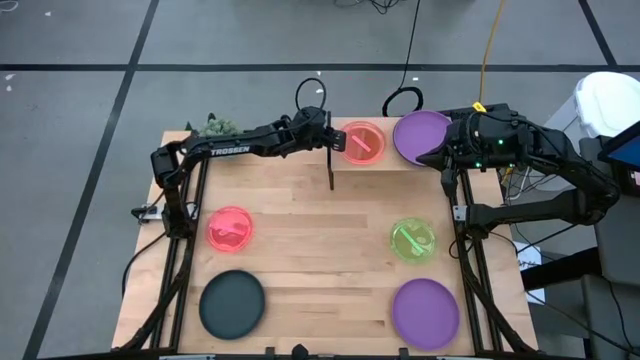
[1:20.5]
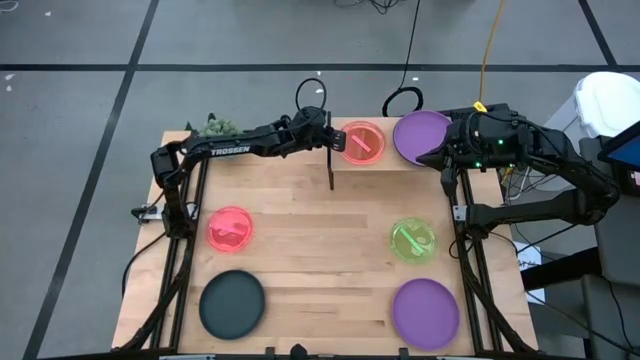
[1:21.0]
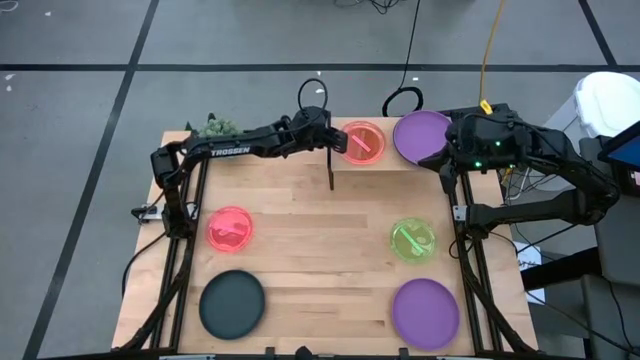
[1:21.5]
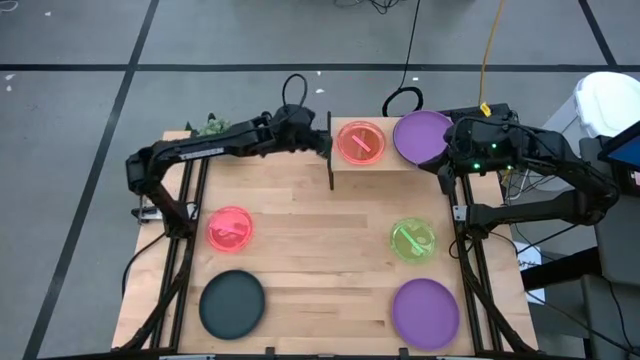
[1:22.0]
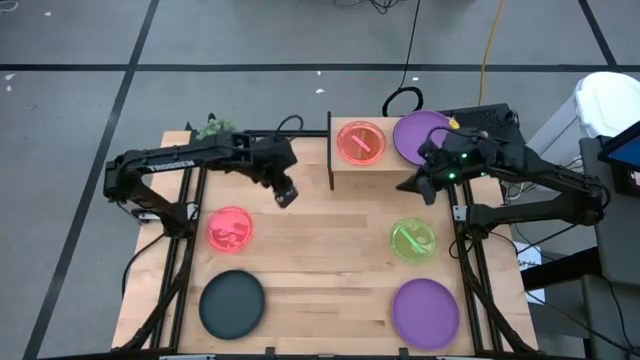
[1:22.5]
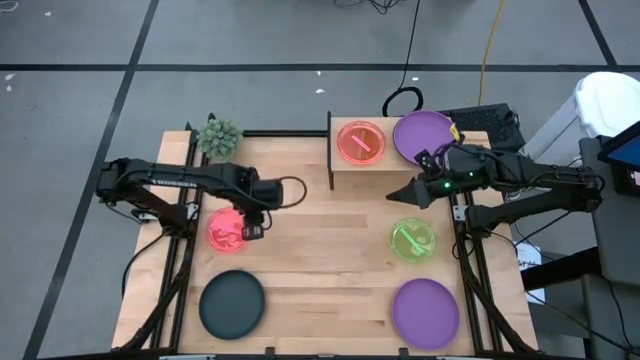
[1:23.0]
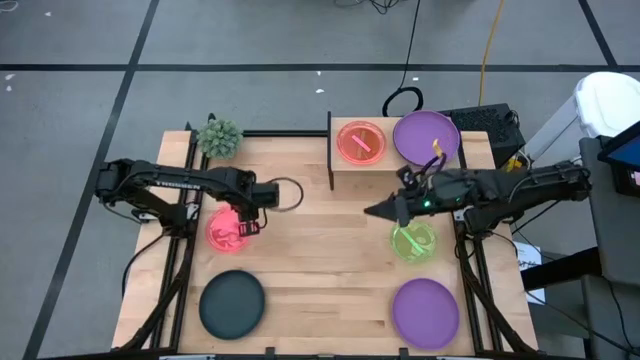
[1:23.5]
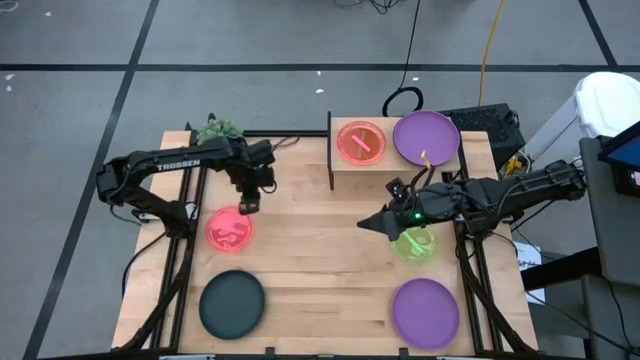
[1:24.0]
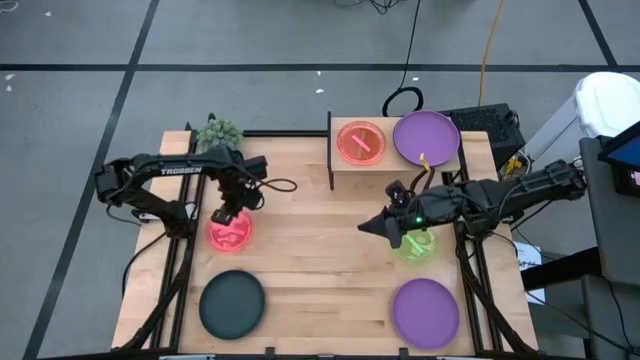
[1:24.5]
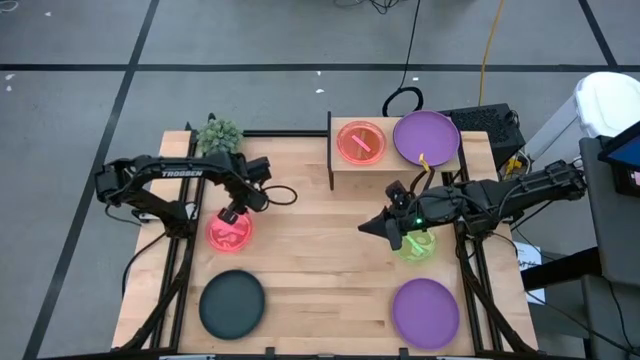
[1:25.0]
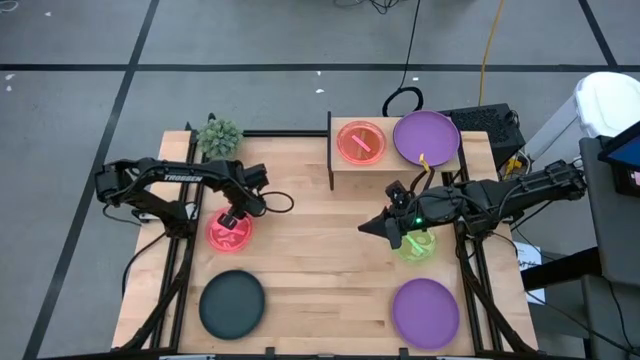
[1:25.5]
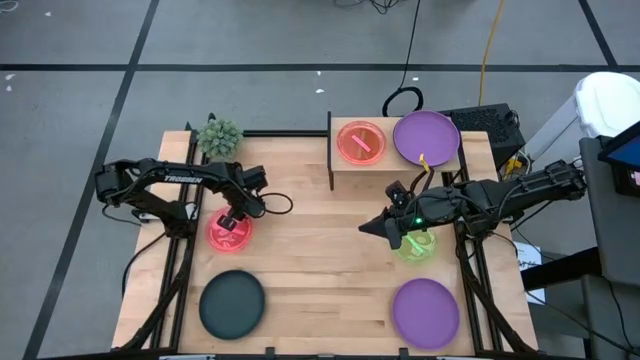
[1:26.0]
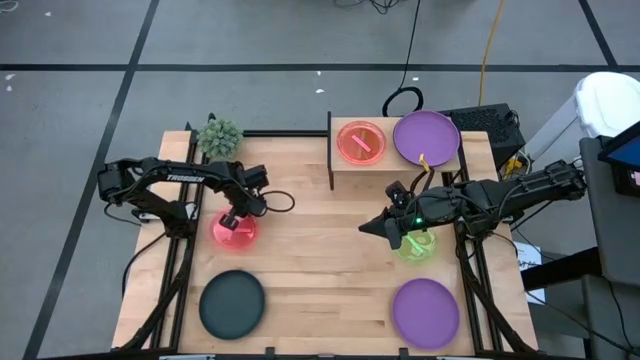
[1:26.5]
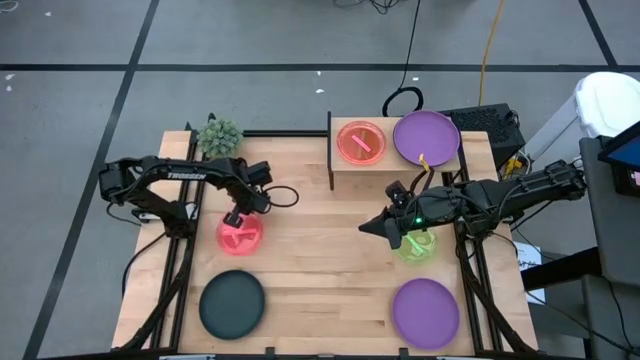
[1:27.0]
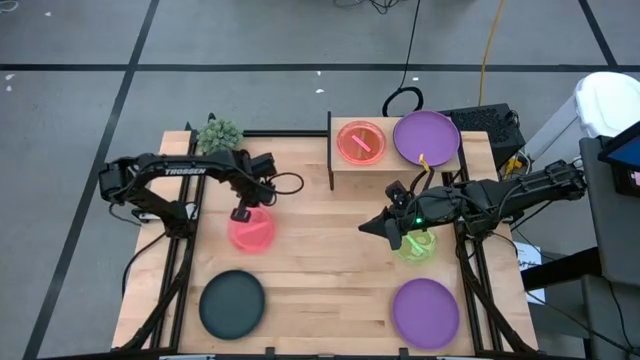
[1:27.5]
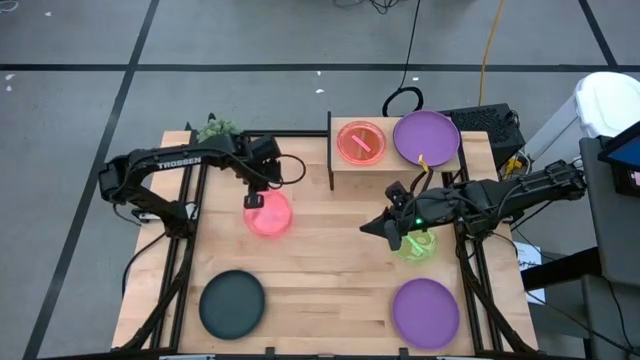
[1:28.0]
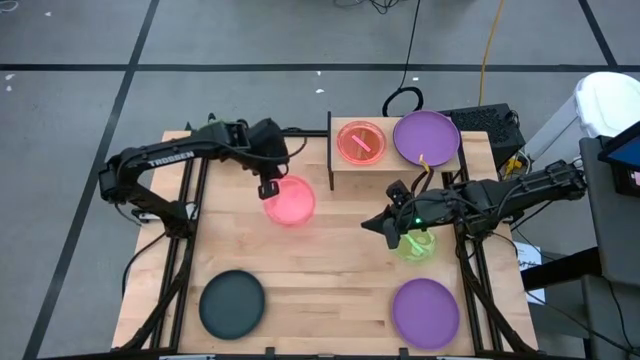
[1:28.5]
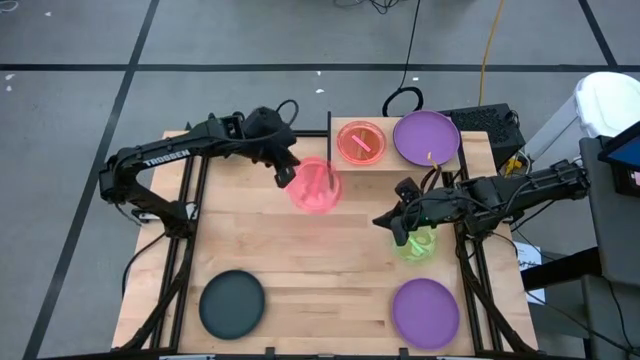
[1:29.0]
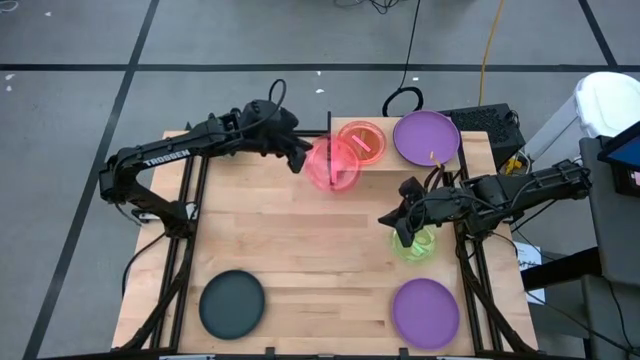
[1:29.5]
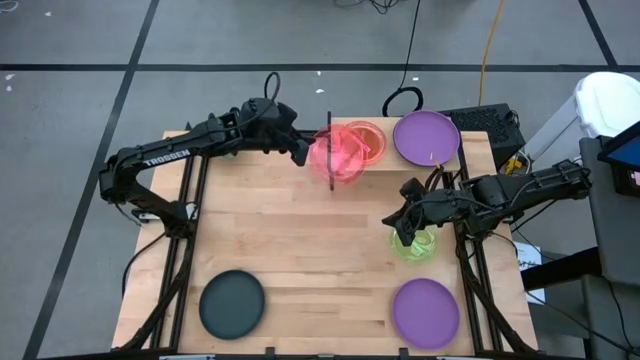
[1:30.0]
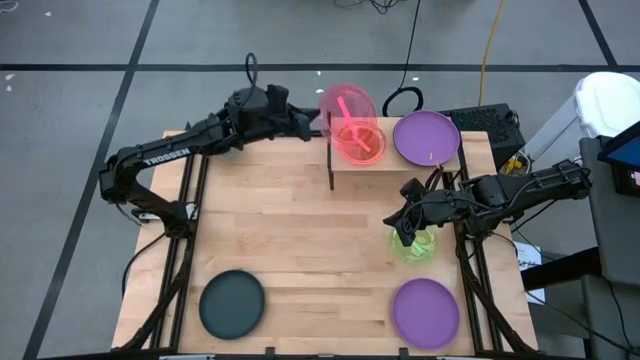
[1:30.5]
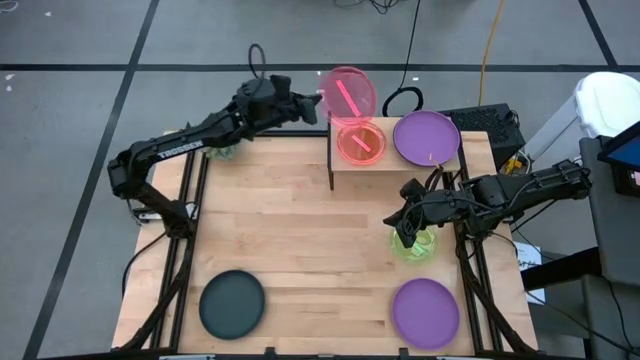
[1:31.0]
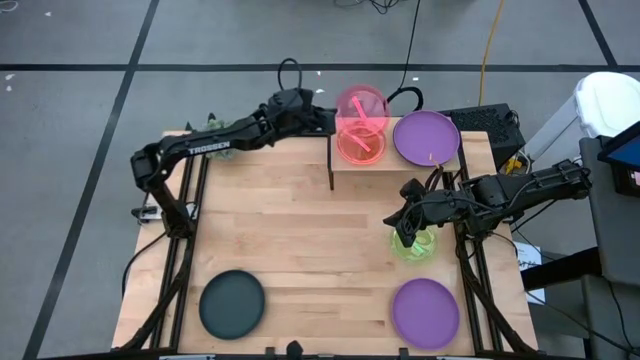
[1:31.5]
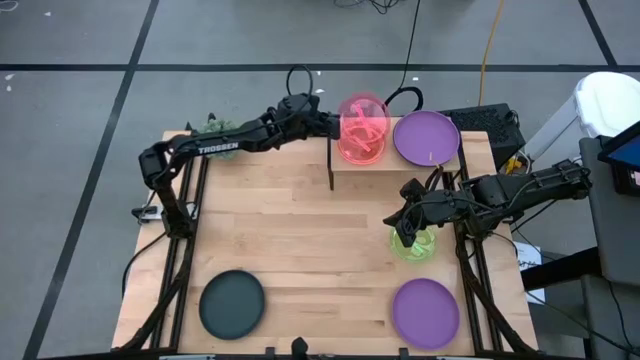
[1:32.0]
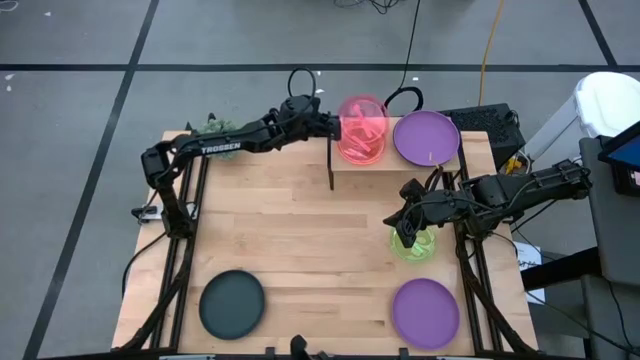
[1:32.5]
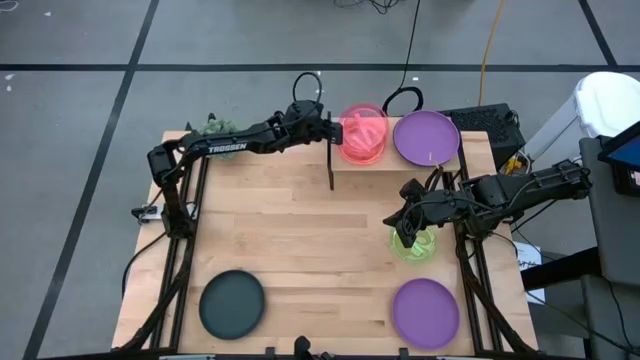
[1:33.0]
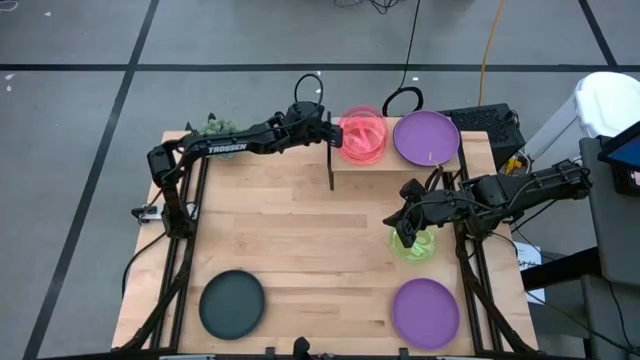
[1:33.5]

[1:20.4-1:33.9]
Task: Place and stack plates onto a shelf
Stack the pink plate on the pink plate on the shelf

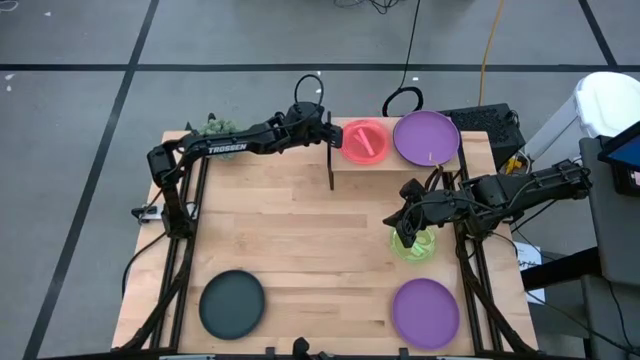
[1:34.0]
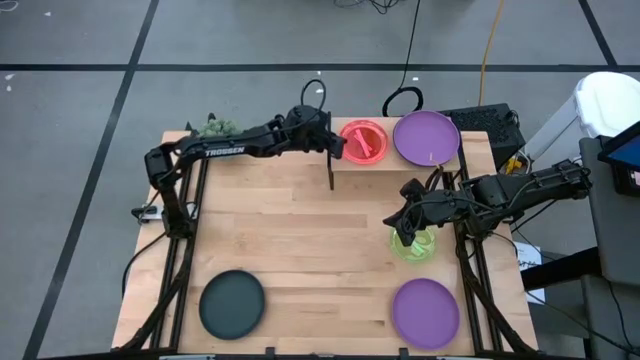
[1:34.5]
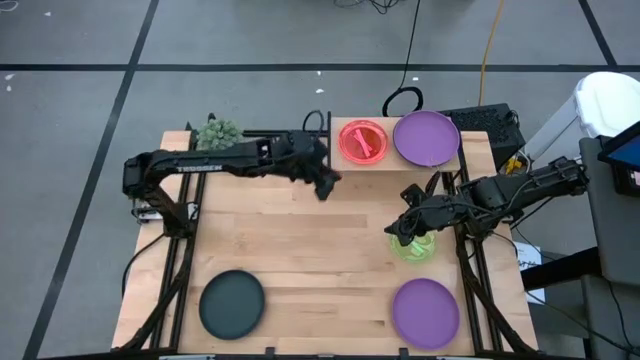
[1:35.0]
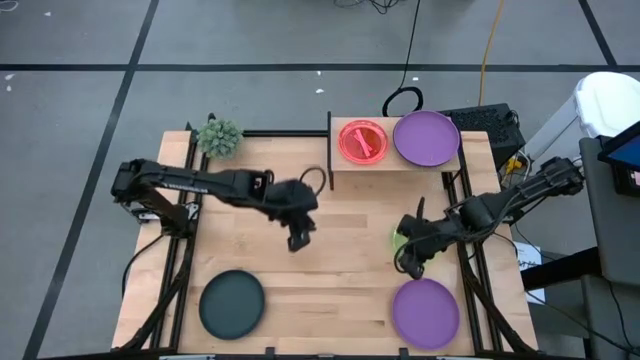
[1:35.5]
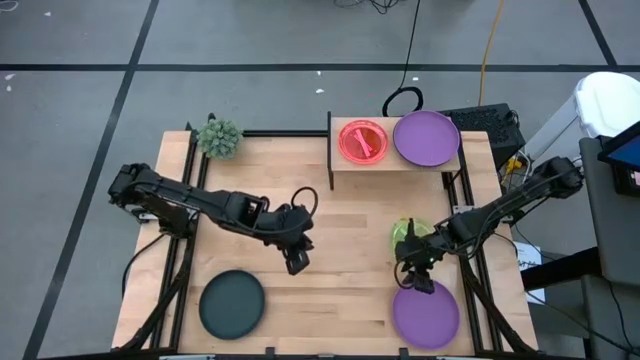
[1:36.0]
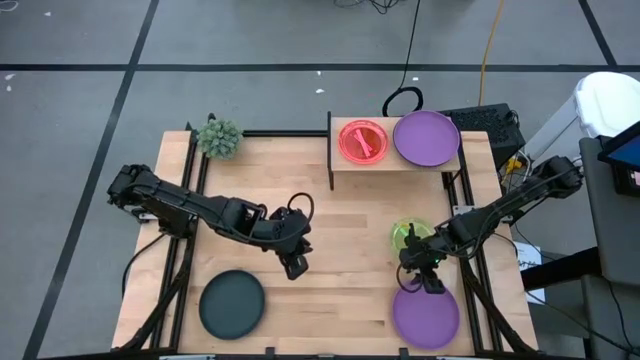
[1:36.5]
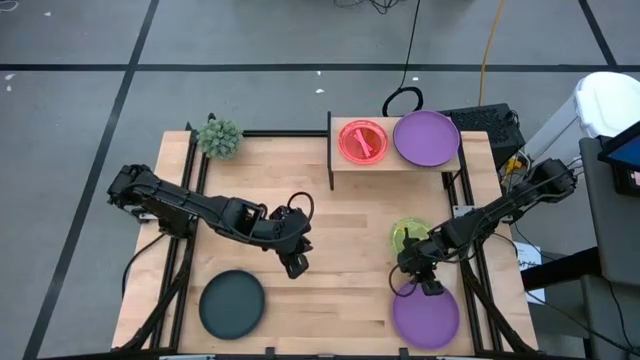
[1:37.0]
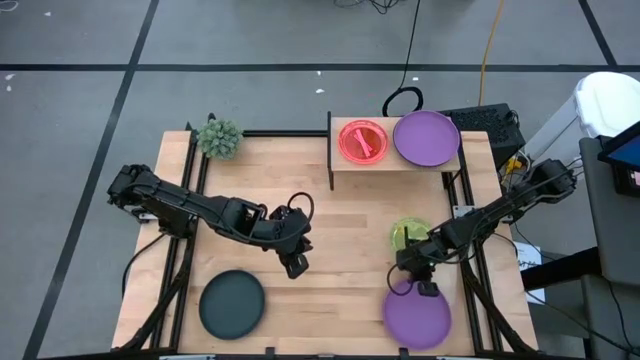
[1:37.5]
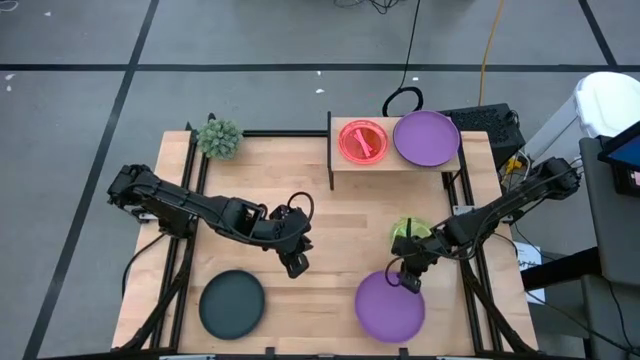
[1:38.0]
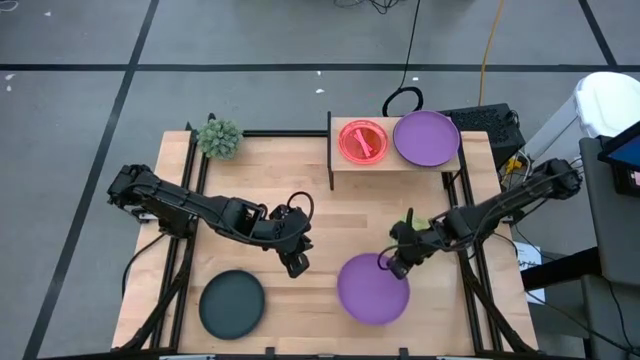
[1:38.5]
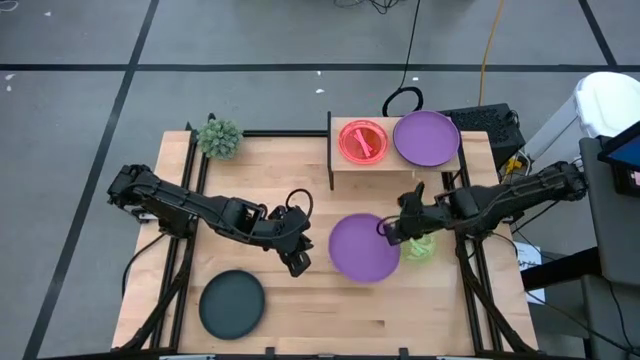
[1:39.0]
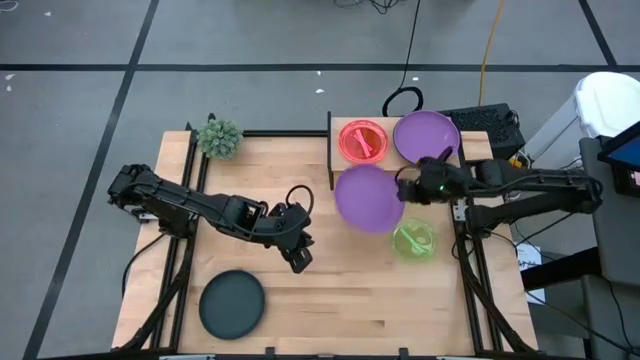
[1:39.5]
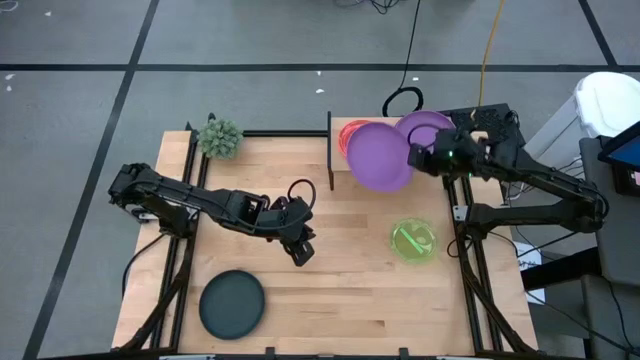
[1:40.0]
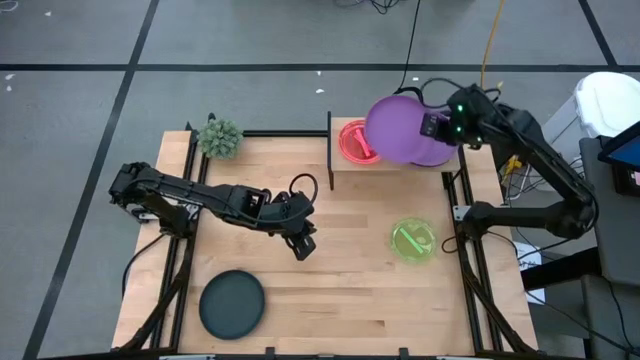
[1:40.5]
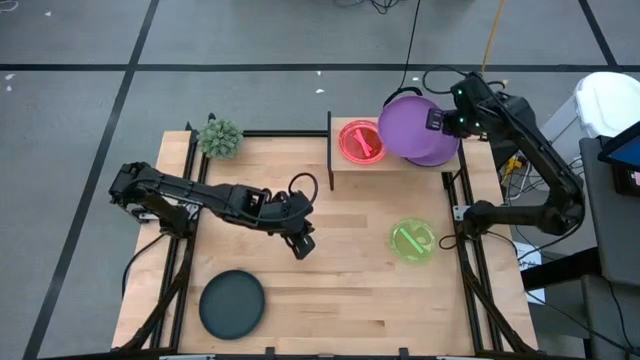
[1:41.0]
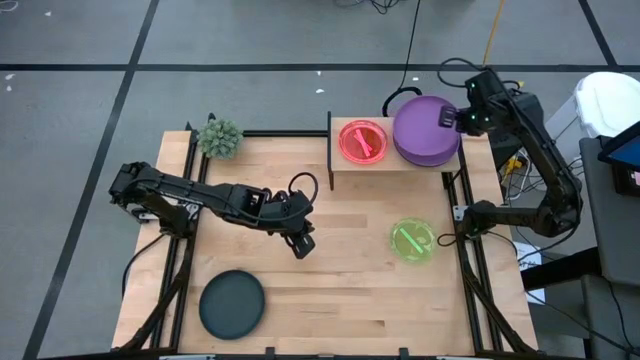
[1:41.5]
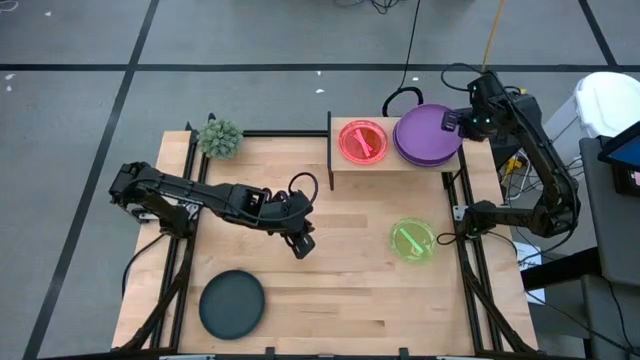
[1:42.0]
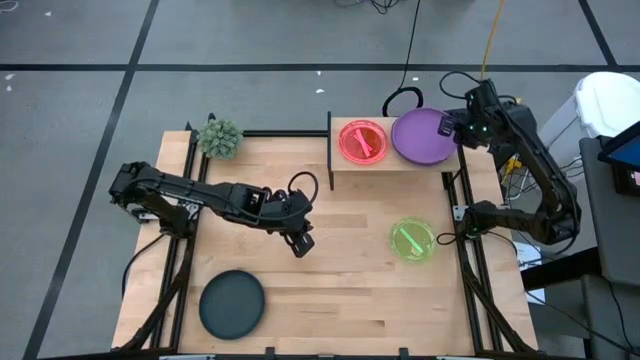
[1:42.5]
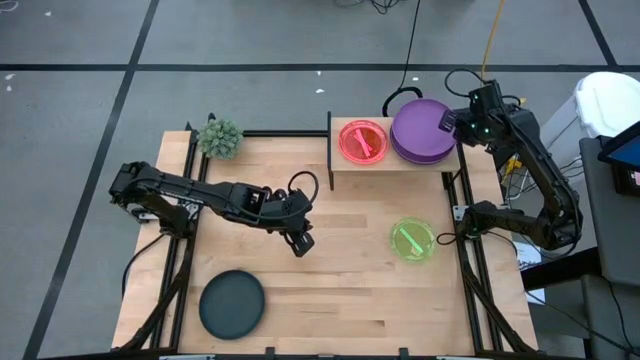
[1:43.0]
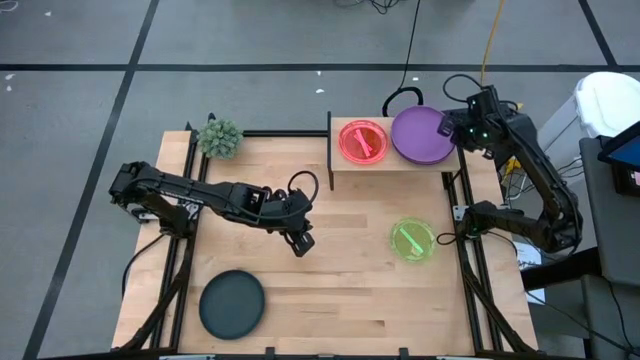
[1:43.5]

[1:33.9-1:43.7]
Stack the violet plate on the violet plate on the shelf
